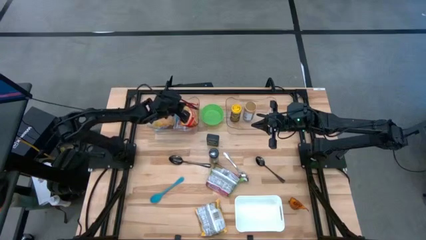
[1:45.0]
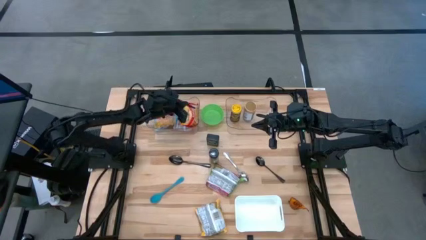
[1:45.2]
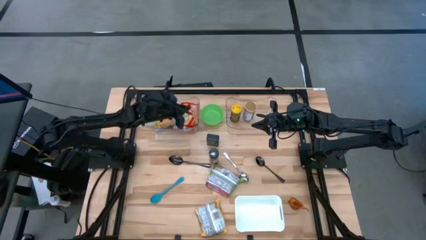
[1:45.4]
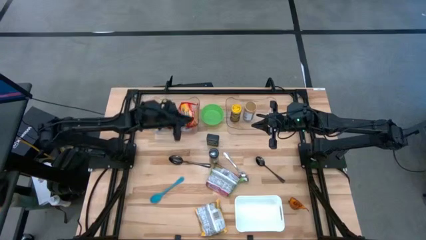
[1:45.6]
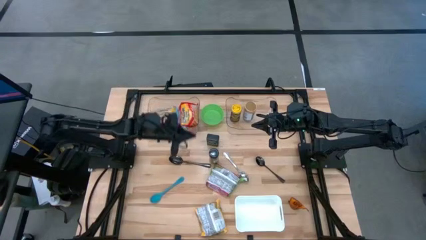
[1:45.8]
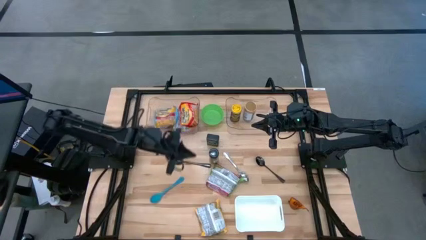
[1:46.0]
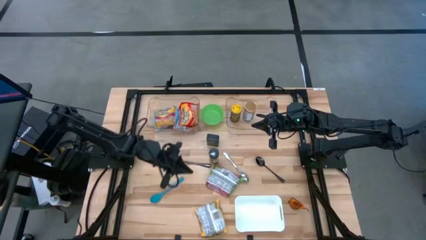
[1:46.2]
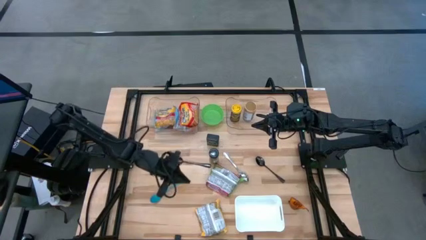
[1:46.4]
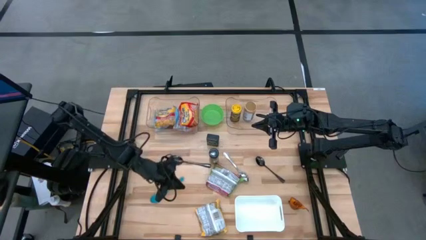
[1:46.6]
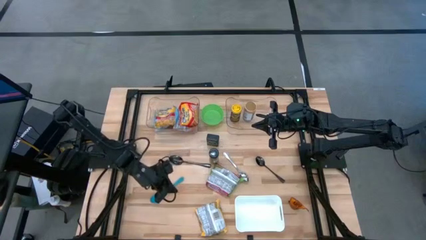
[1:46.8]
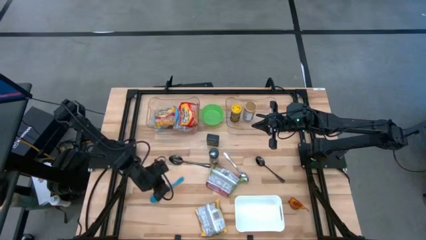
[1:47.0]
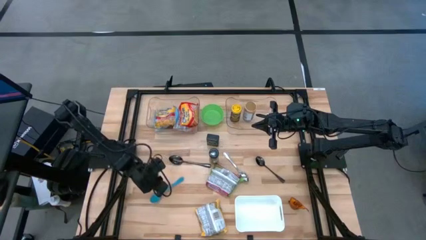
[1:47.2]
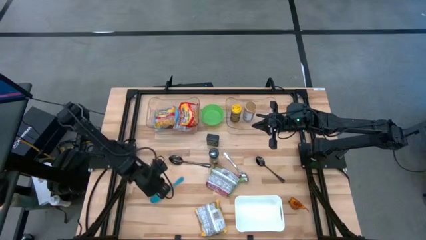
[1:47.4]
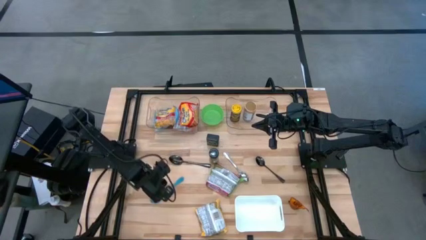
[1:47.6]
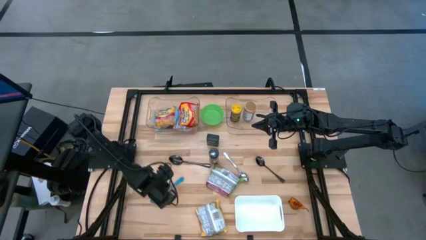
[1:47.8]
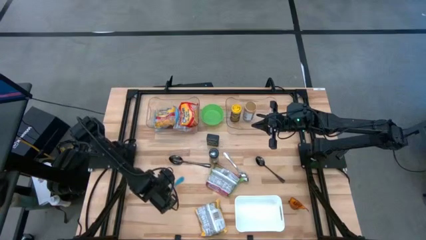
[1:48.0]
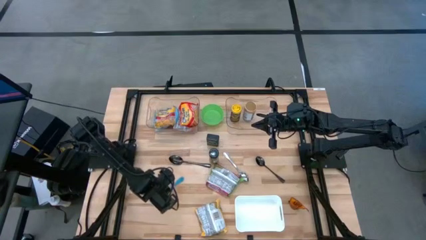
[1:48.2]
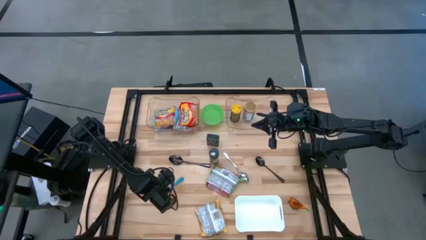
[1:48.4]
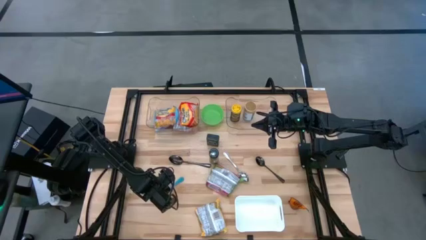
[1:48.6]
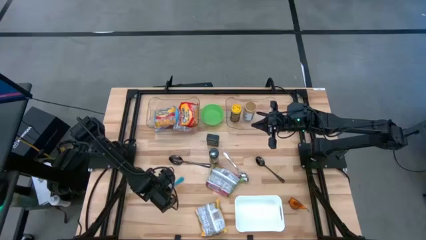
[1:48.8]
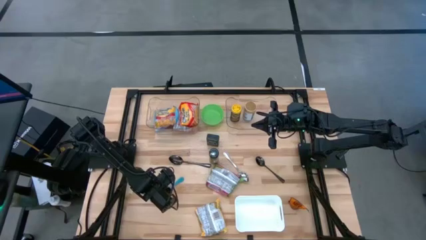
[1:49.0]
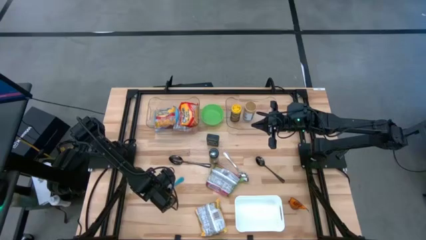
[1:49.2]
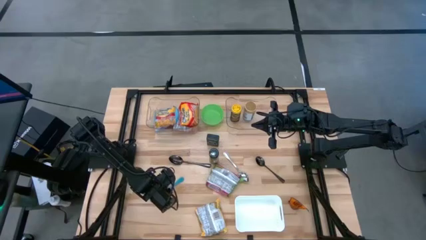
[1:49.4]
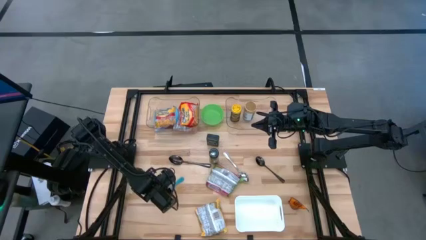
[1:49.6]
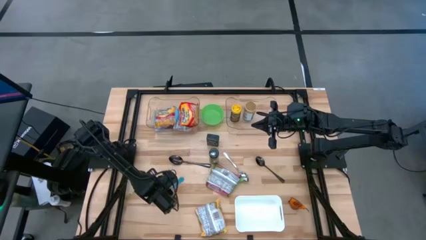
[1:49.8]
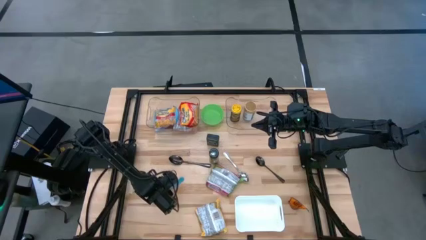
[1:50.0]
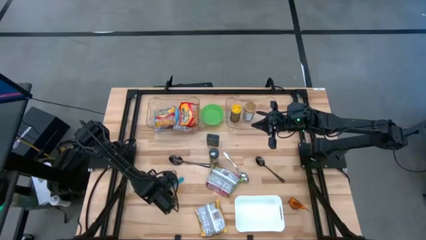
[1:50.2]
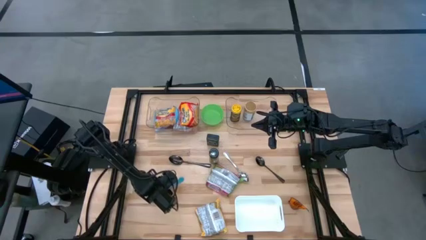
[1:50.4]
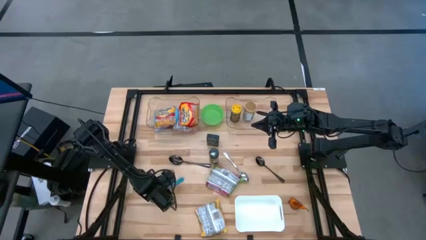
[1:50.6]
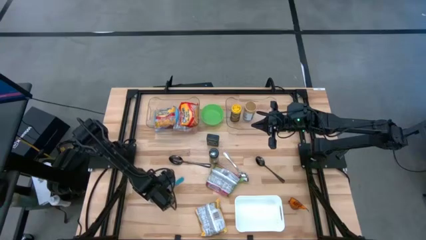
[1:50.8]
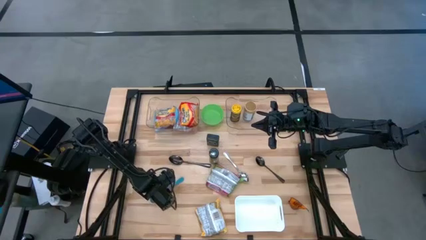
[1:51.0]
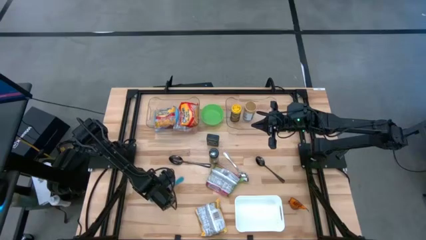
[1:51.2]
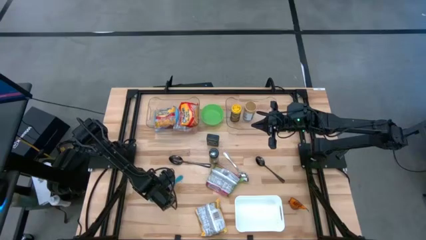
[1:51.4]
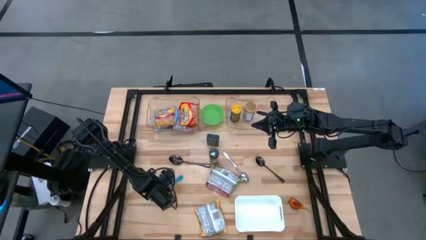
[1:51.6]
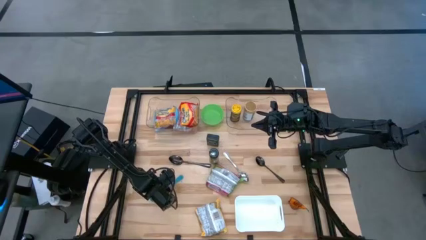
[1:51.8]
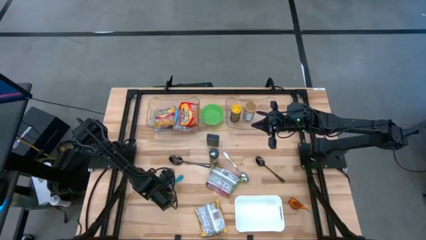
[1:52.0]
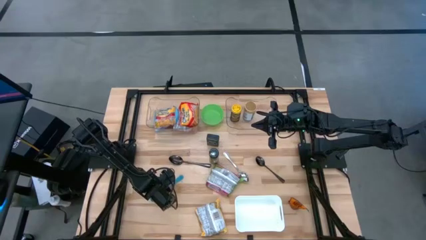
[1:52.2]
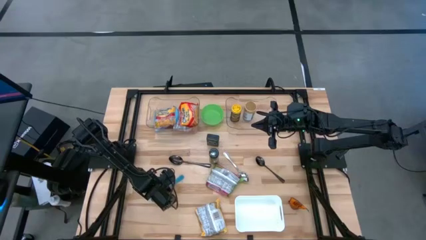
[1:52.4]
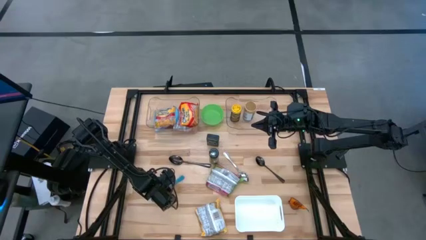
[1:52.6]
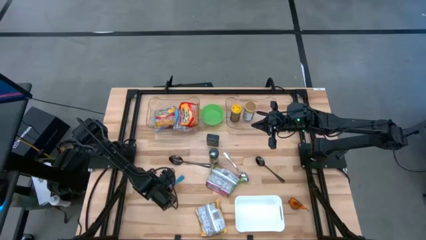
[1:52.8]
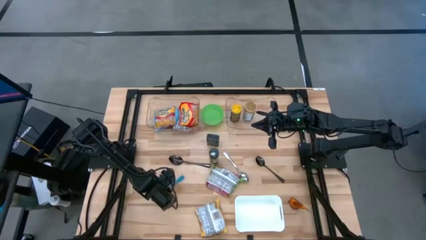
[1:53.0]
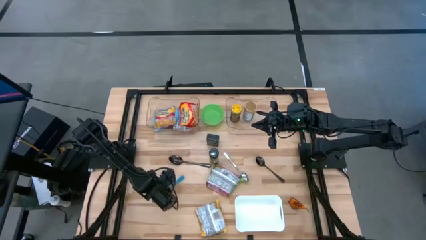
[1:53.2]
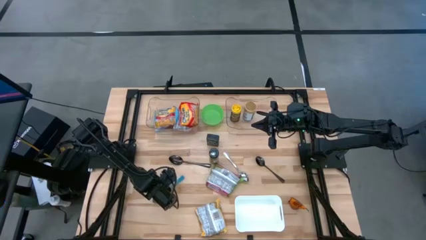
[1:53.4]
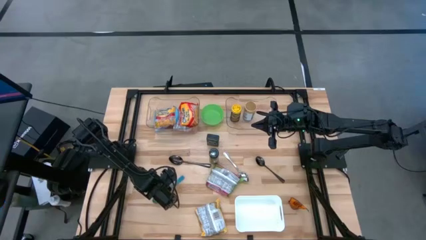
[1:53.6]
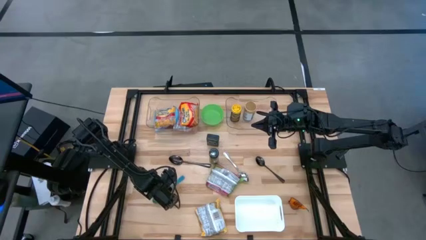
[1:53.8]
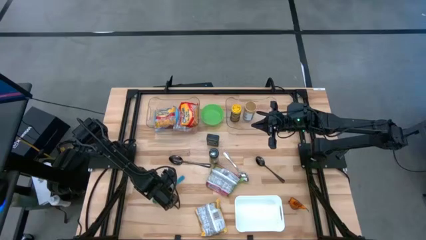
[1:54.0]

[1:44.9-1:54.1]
Task: Pick & Place Food Item
Put the blue spoon in the white bin

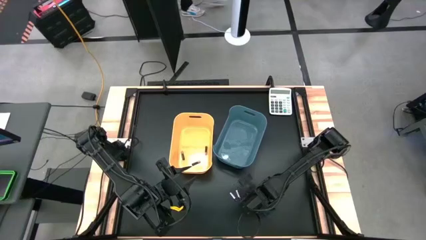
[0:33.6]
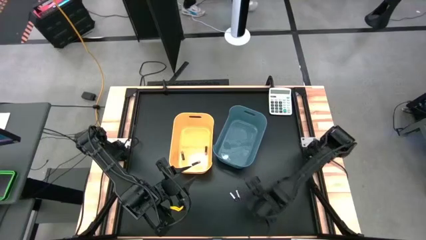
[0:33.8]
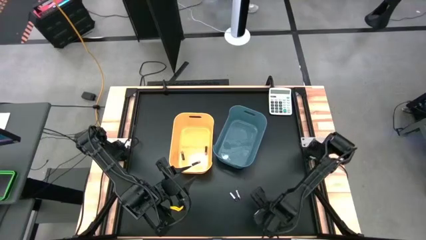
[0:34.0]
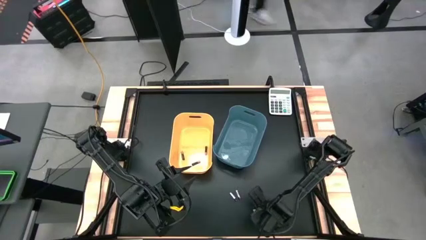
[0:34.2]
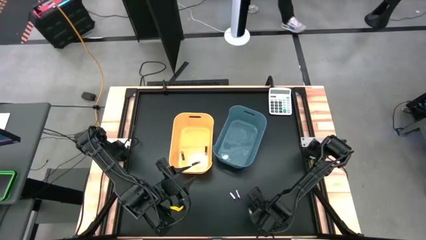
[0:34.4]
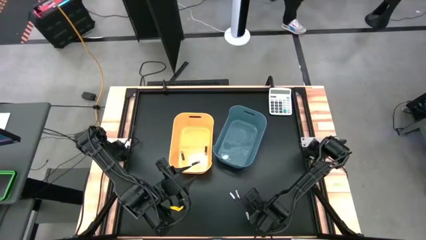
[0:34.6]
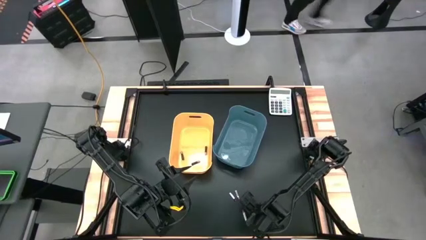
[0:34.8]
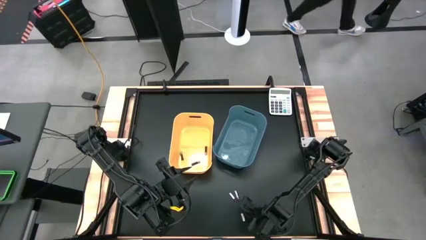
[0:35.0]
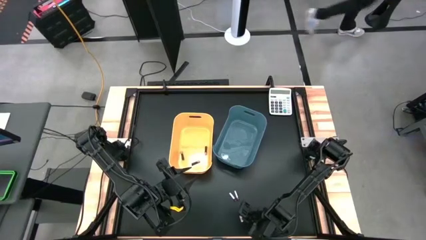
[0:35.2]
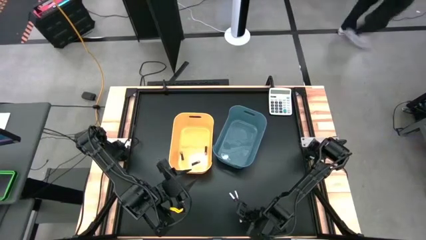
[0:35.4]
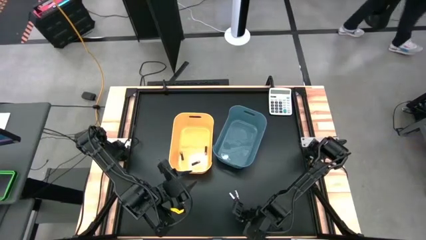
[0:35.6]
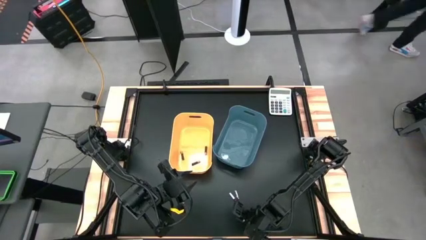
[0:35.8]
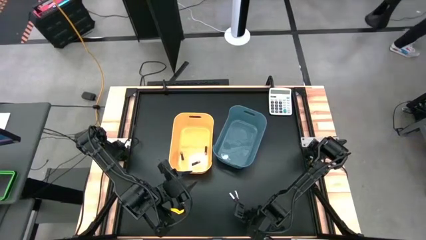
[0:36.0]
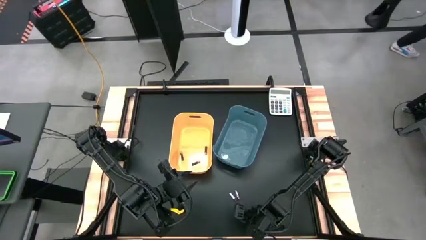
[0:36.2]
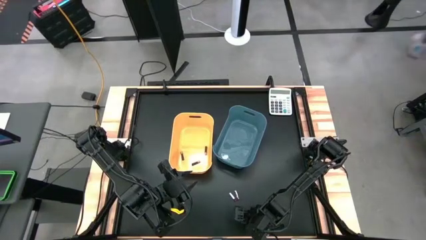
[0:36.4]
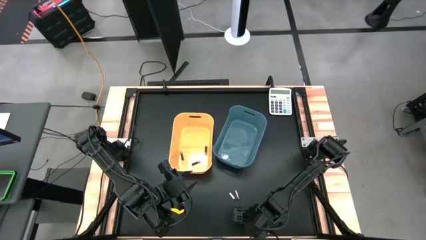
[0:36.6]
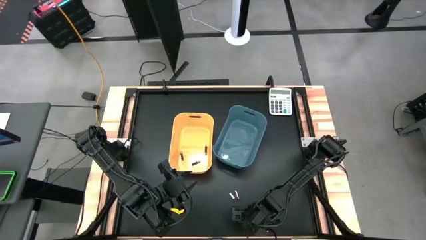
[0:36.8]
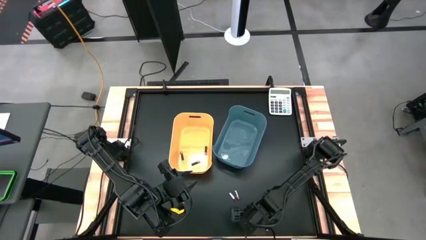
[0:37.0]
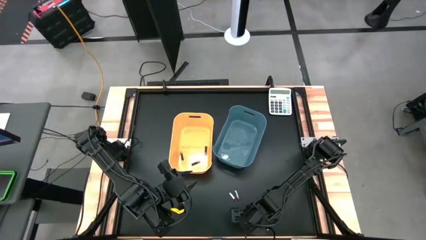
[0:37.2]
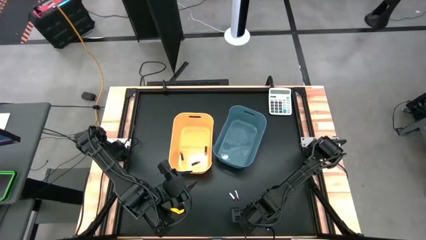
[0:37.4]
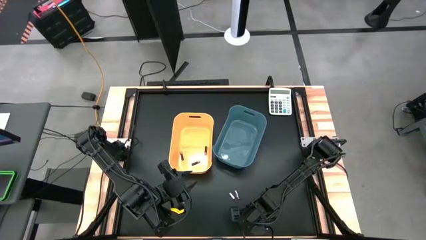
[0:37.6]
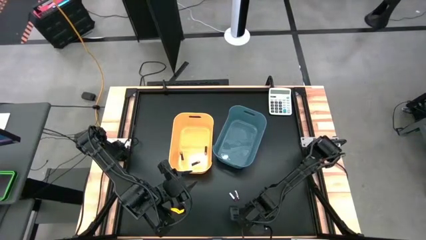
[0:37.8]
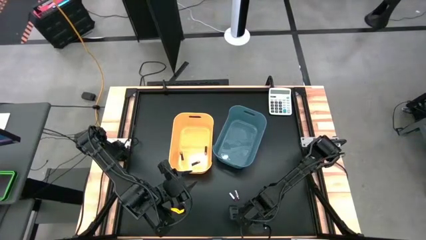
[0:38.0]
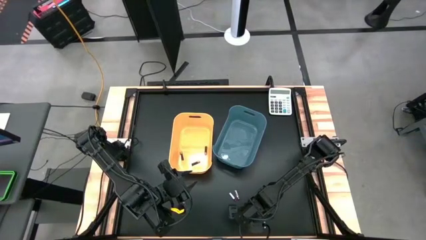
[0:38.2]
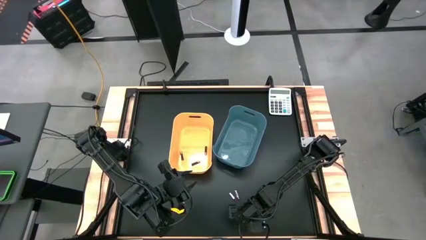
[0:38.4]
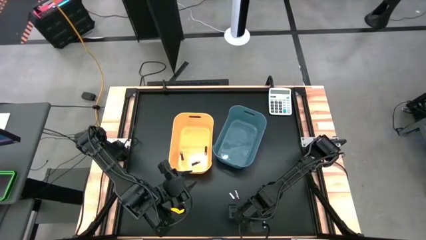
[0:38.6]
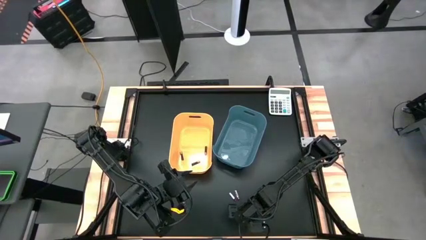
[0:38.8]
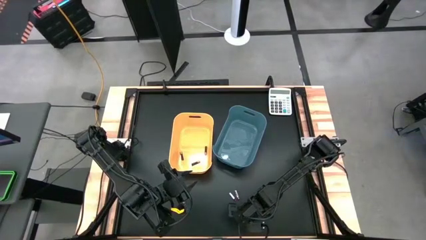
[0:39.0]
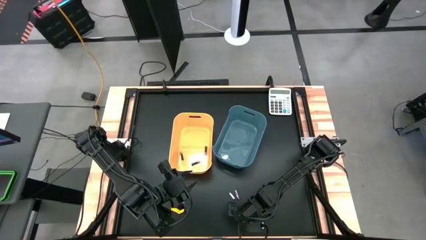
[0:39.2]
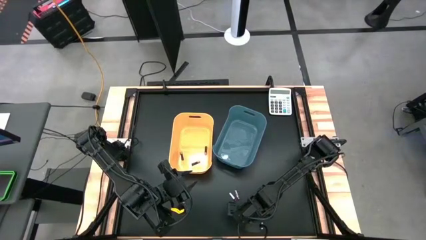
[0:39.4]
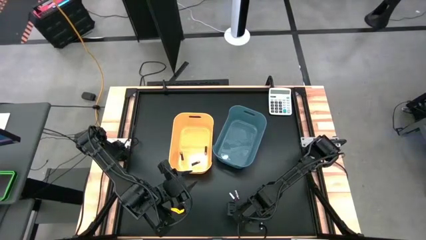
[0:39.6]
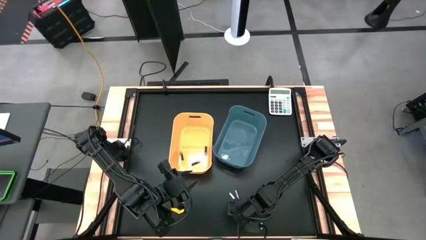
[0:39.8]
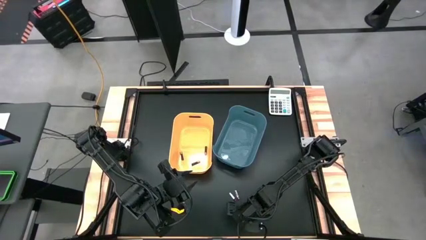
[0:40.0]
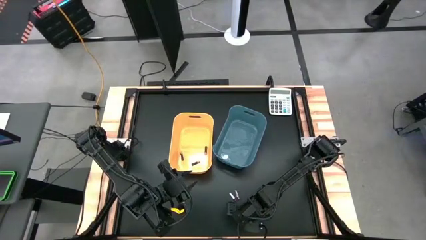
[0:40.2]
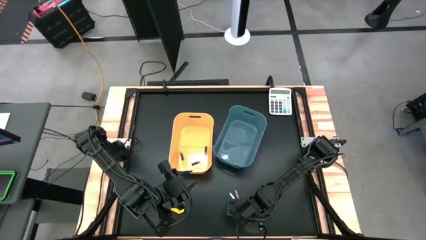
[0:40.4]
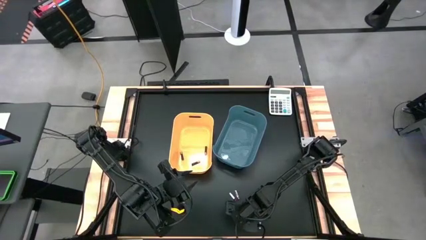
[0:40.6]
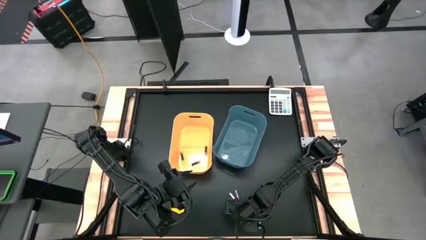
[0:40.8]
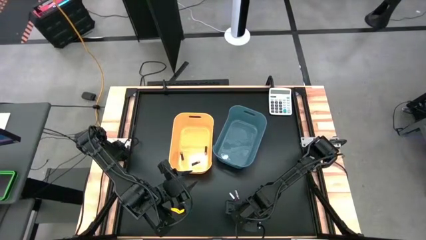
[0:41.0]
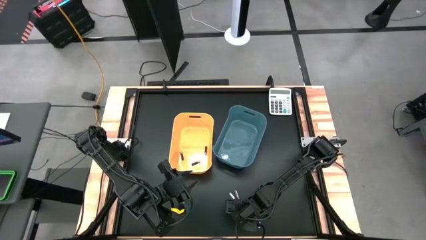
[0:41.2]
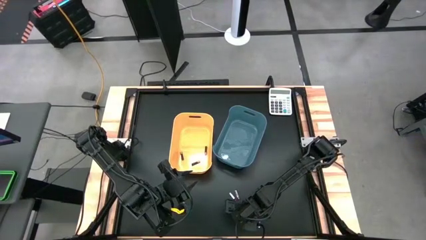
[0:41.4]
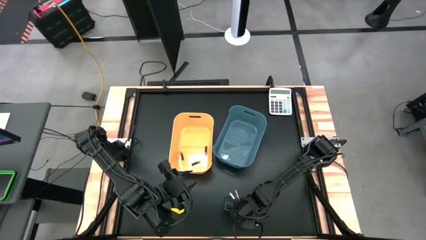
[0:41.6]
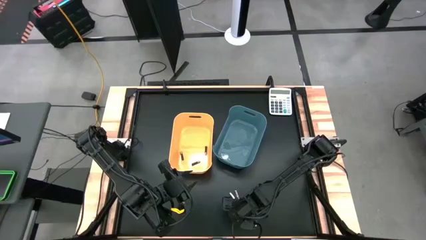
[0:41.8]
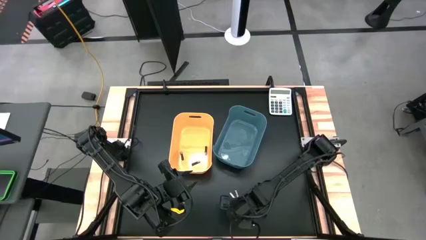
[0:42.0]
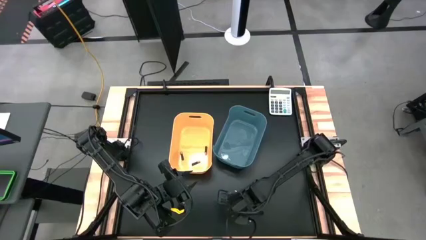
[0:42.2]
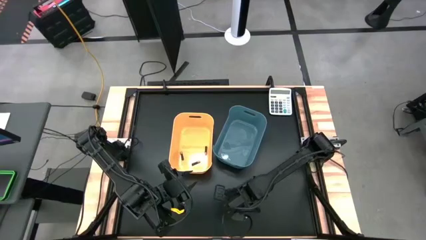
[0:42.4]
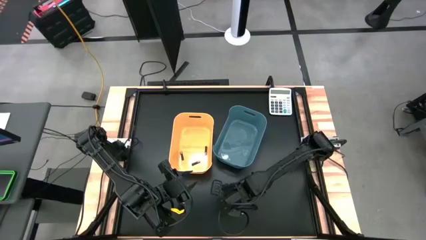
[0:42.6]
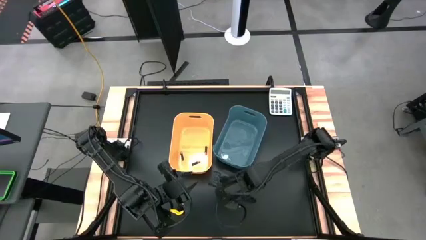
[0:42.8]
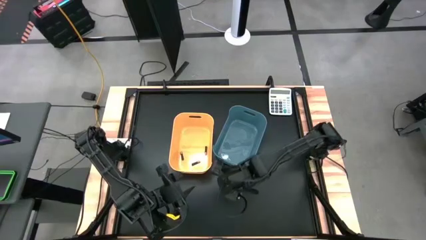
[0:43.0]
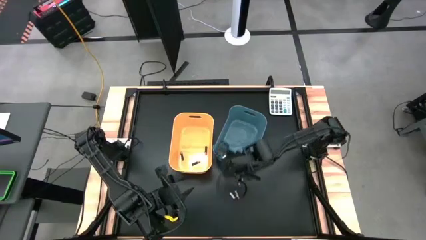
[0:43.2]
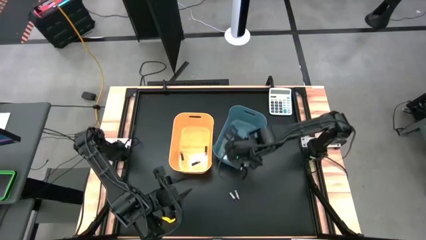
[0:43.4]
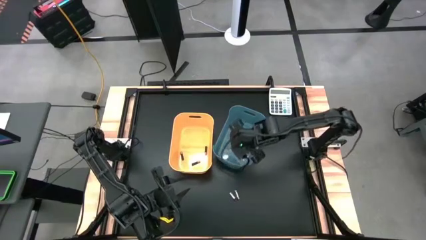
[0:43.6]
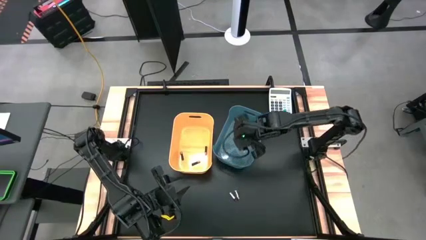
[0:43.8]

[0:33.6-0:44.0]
Task: Sort batteries
Put the bottom left silver battery in the blue bin
